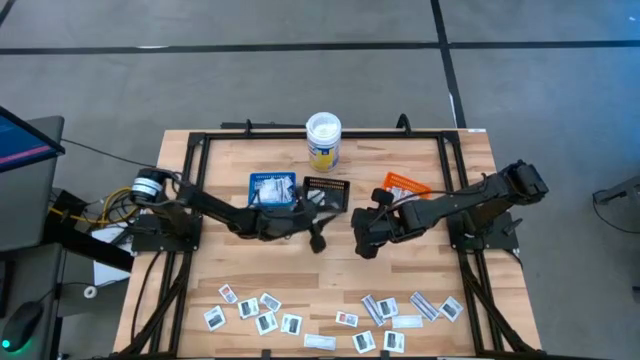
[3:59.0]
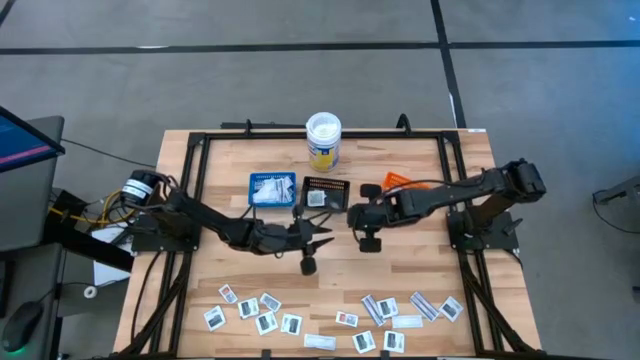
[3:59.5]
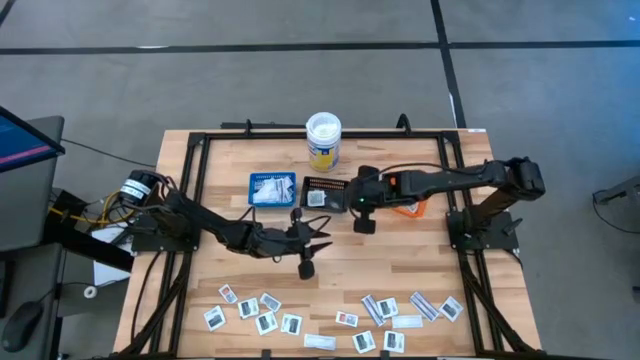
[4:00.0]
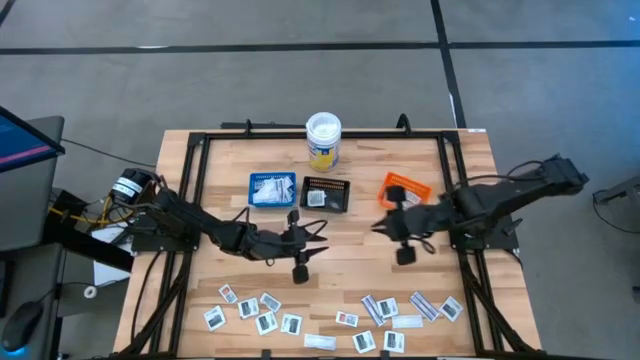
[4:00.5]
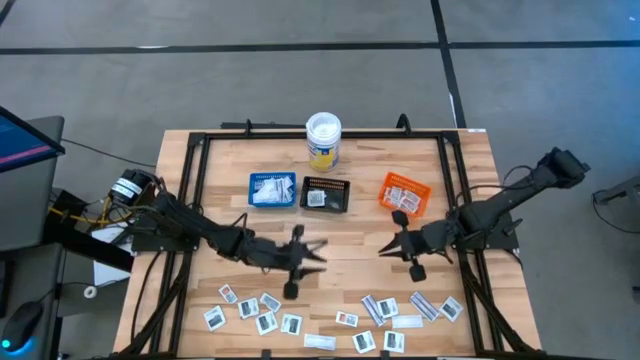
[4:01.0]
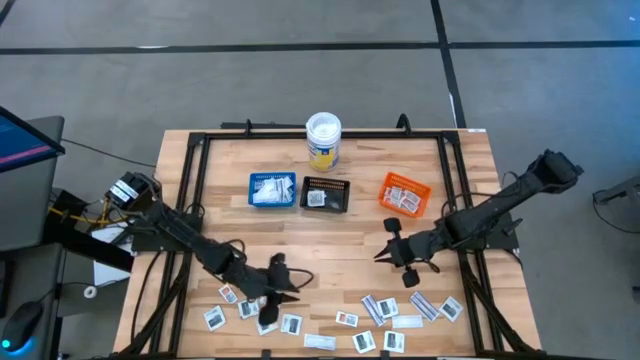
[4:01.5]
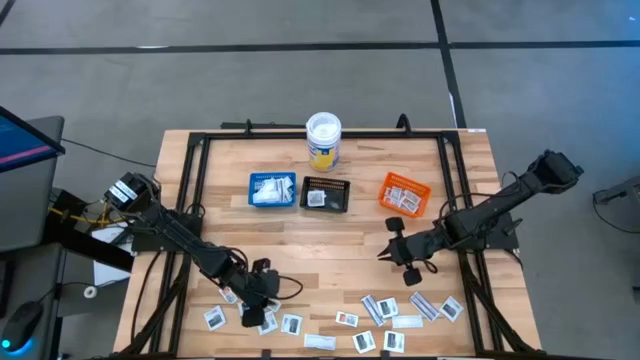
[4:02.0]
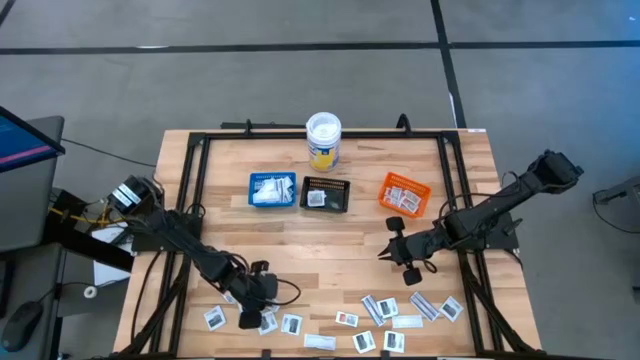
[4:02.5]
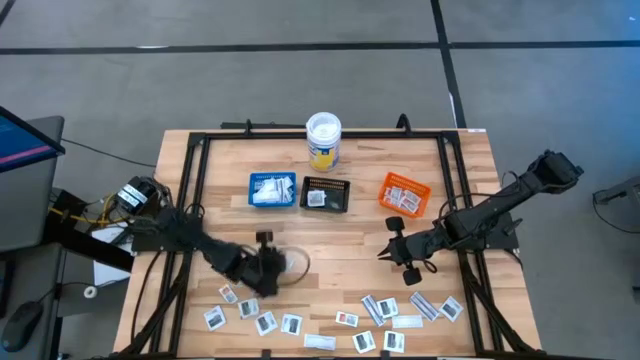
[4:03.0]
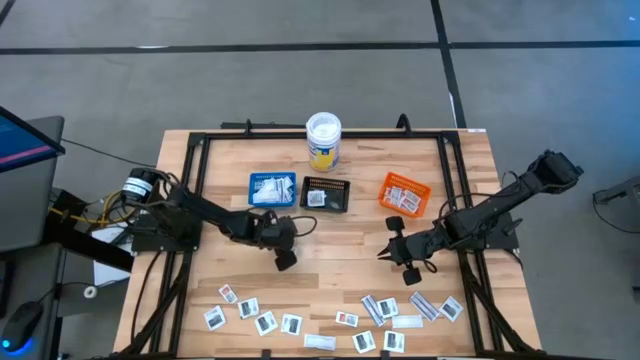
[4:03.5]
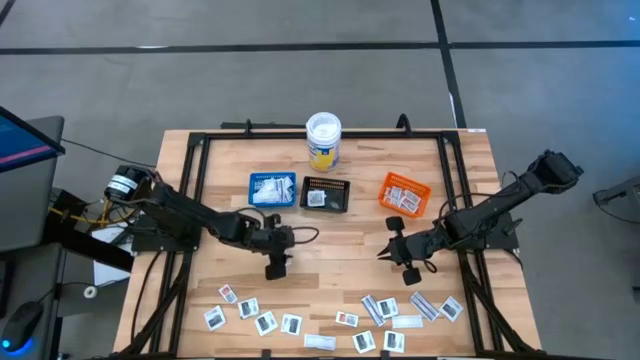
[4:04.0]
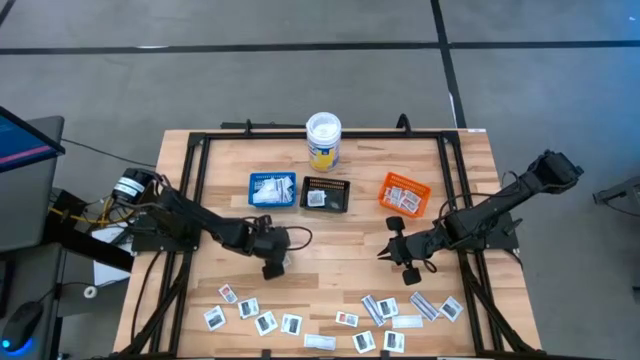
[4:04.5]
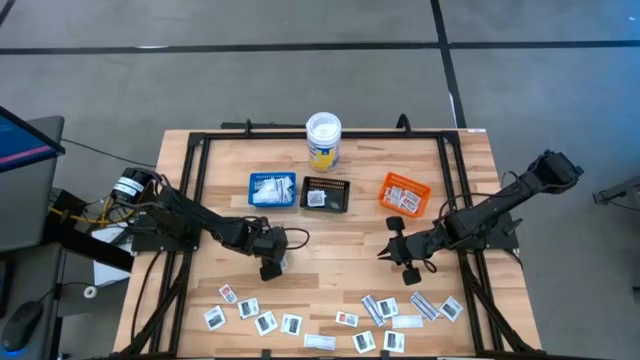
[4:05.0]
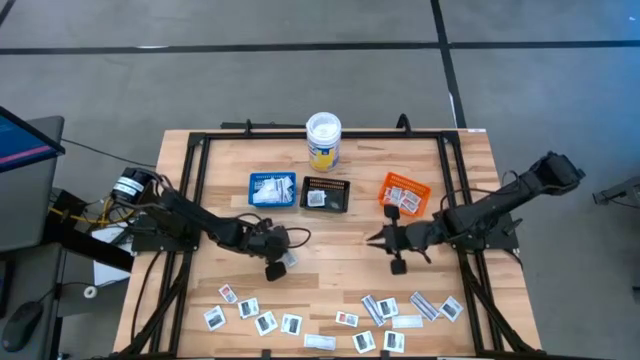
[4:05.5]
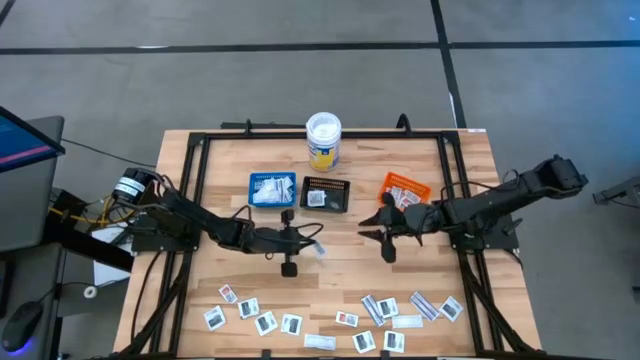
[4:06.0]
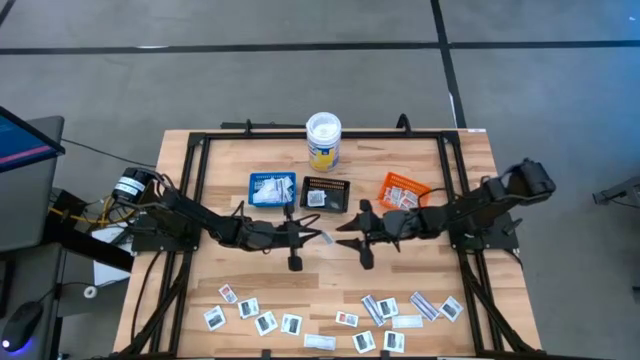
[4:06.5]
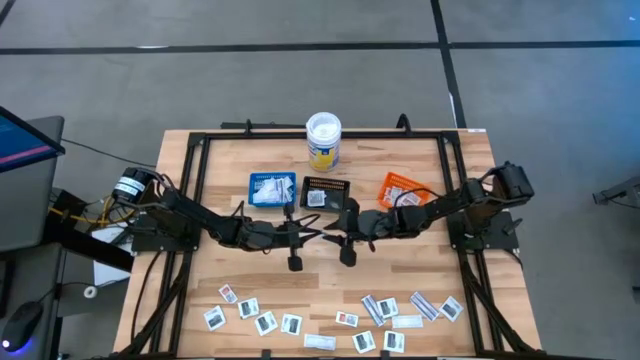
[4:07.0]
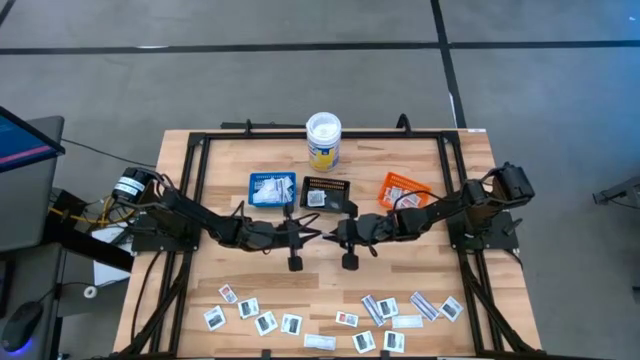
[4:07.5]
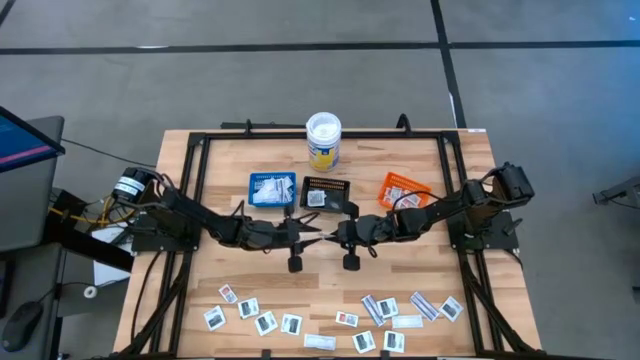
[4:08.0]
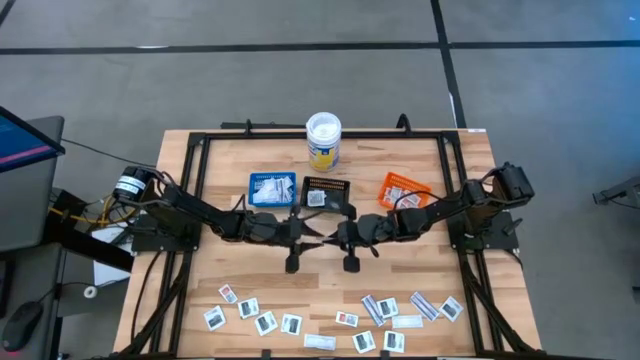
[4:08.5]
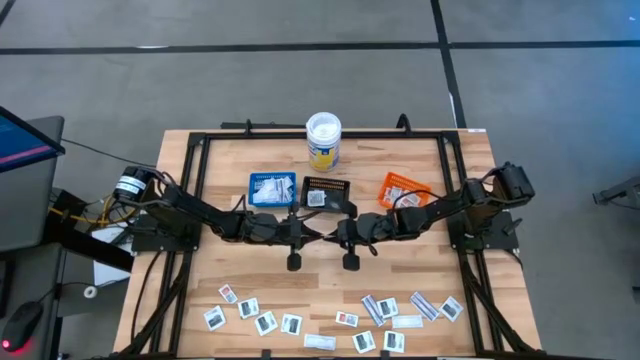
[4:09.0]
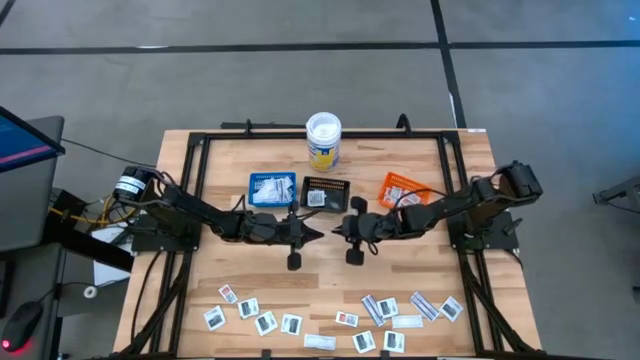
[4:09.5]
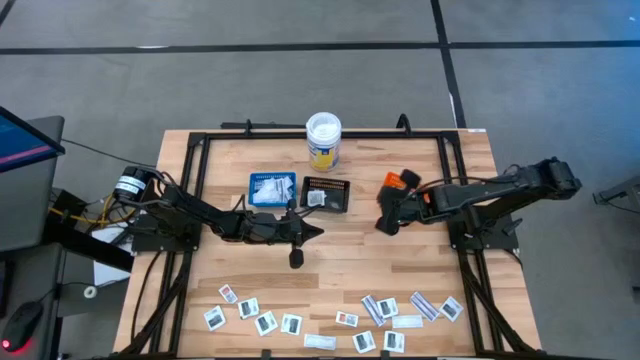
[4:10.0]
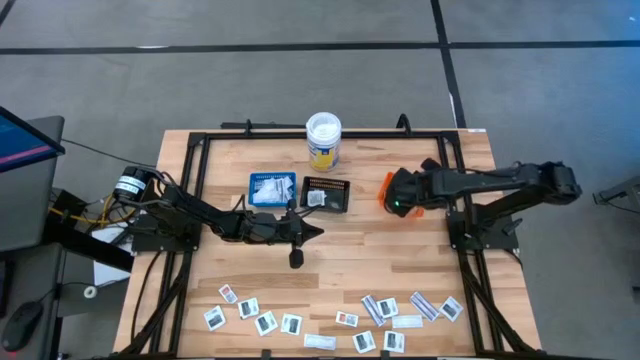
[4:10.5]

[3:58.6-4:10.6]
Task: Pick & Place First Aid Supplies
Put the orange ointment pack into the orange bin

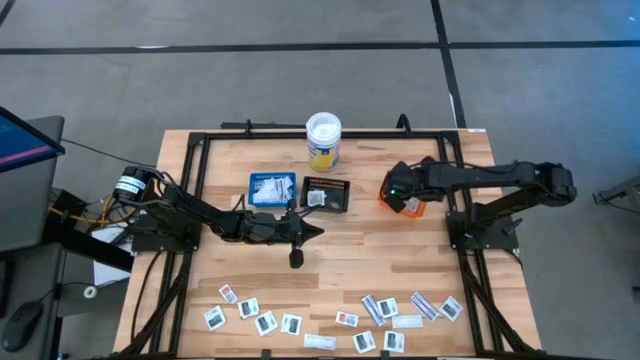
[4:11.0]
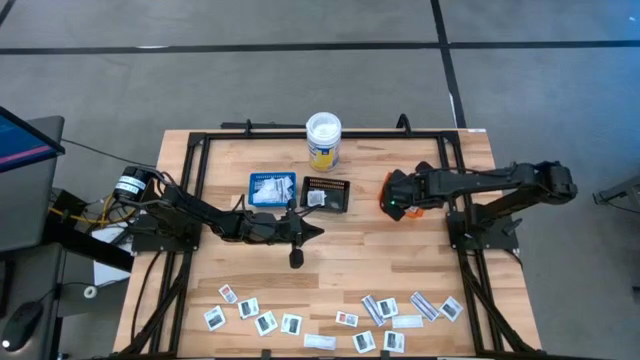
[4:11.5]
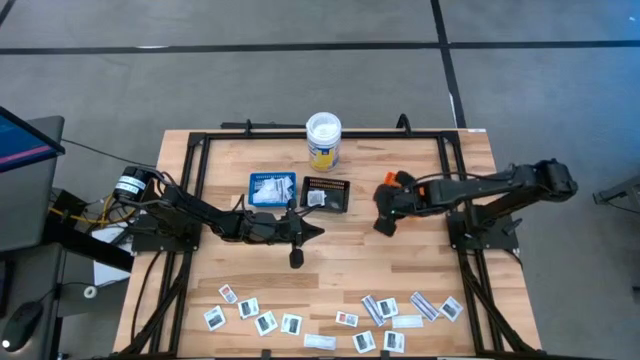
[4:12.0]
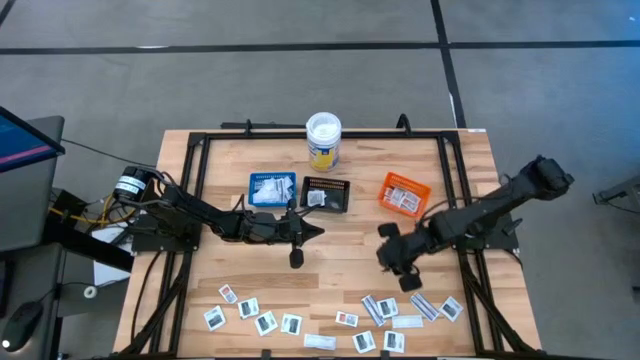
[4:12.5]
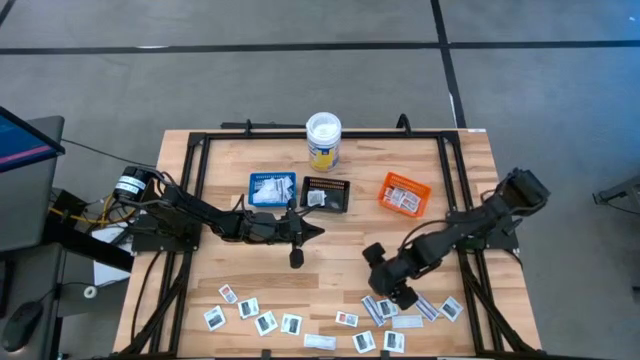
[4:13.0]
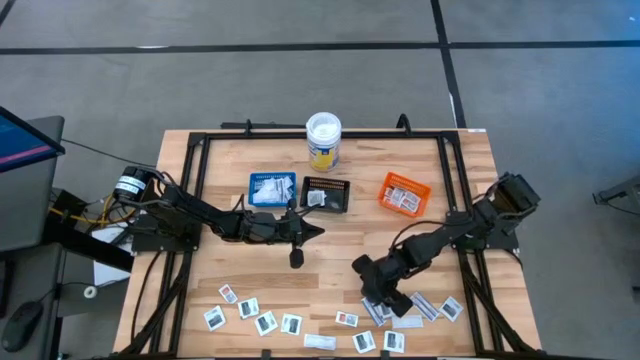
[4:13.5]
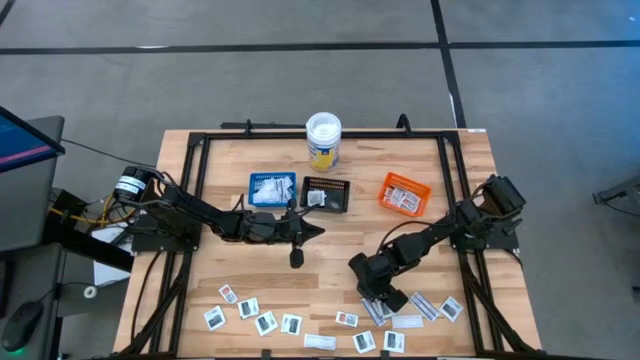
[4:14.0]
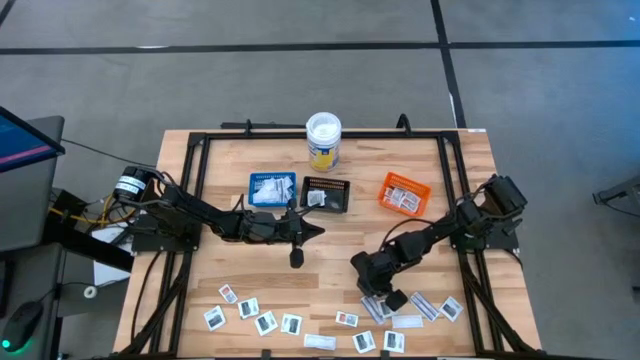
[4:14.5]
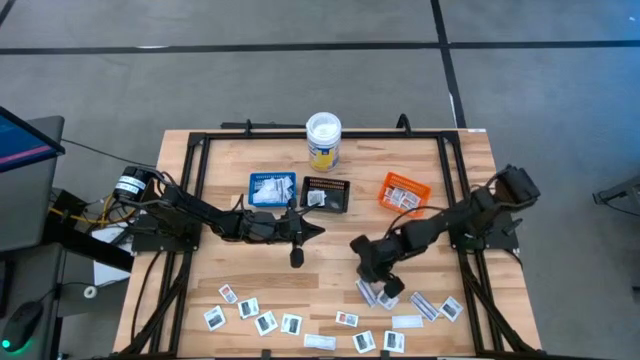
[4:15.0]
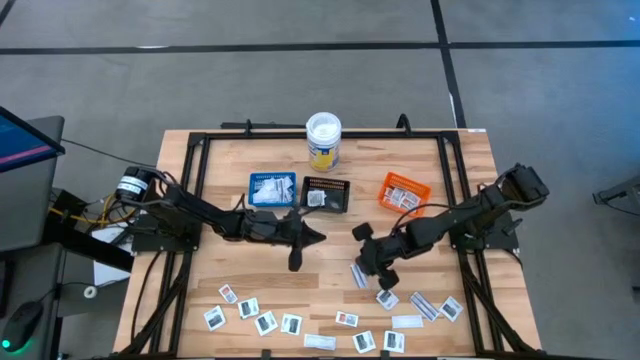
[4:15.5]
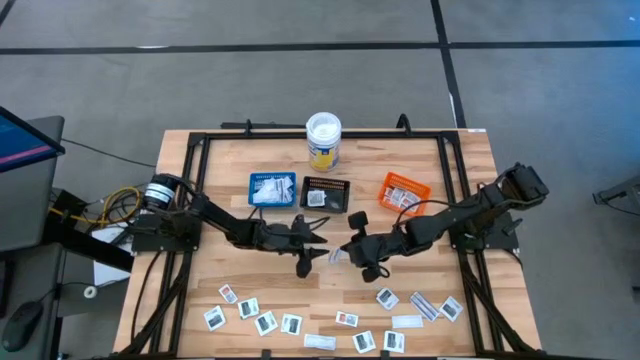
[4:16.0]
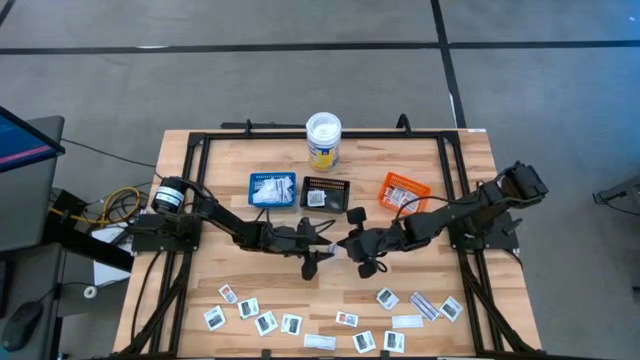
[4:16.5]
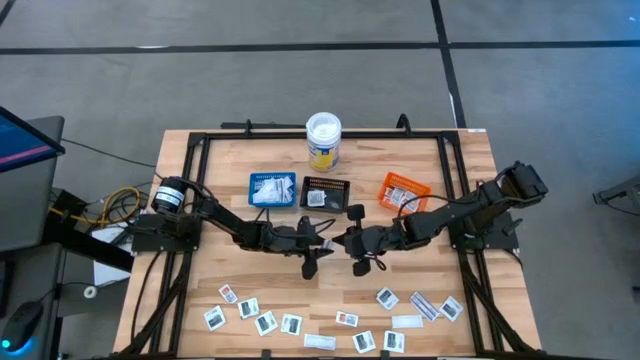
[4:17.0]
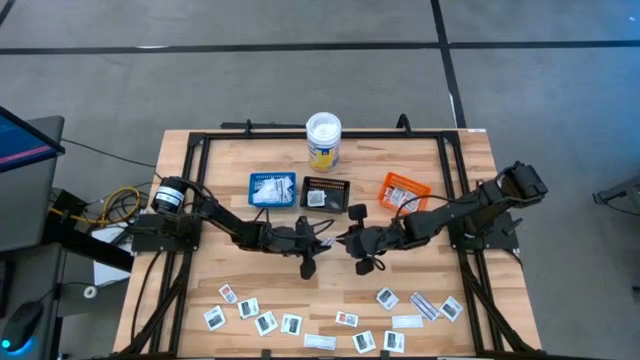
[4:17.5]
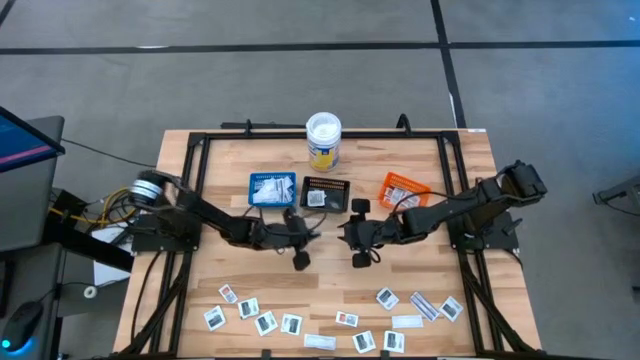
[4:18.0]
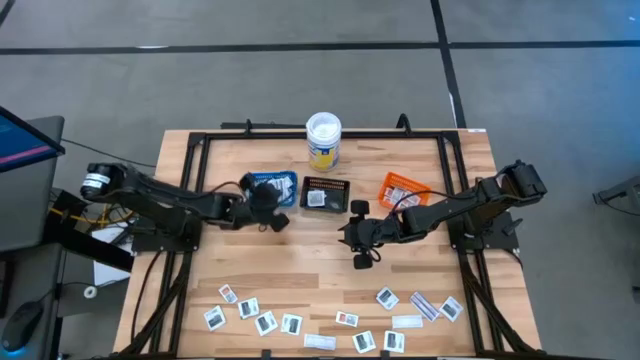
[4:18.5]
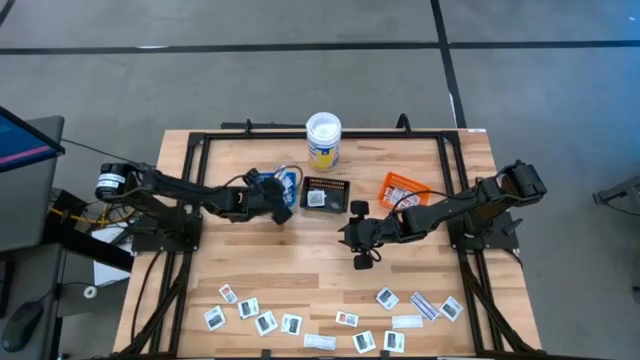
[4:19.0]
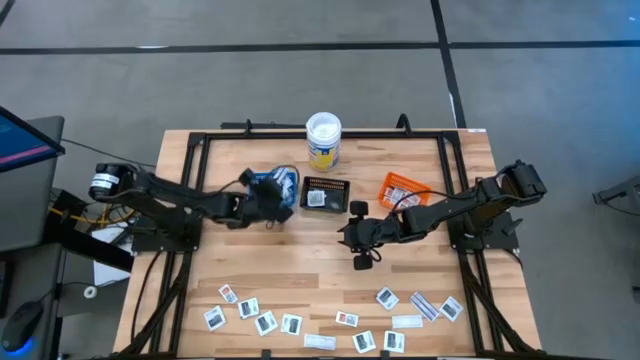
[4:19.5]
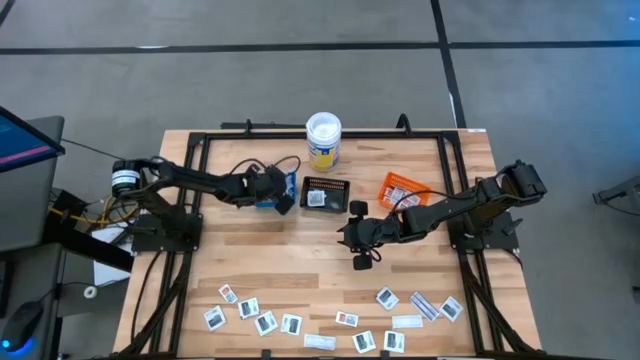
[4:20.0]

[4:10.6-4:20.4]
Put the blue bandage into the blue bin
